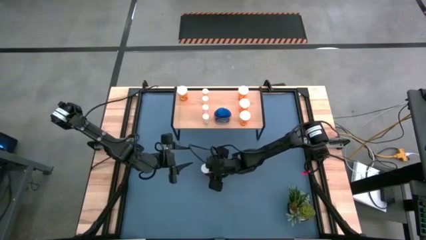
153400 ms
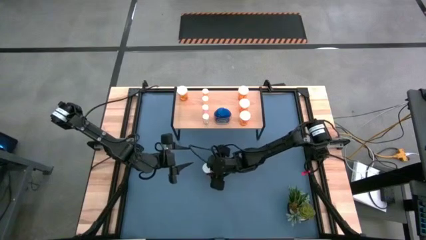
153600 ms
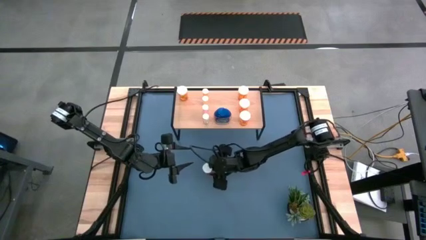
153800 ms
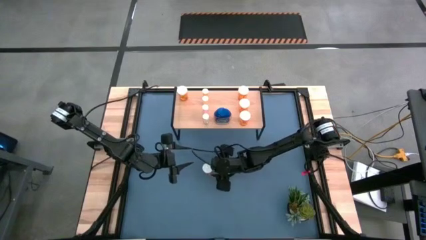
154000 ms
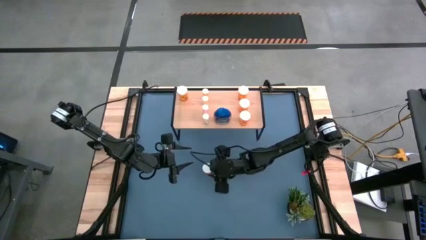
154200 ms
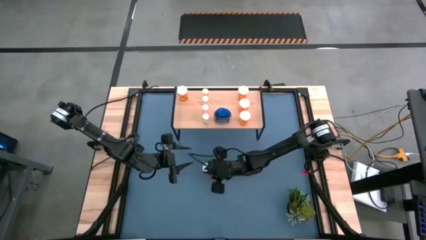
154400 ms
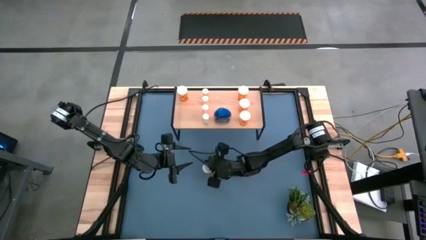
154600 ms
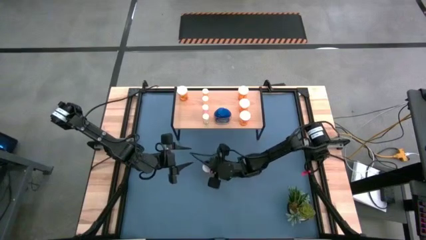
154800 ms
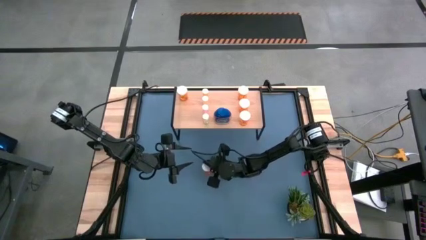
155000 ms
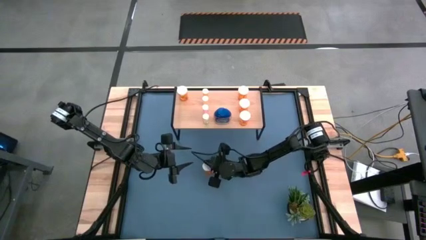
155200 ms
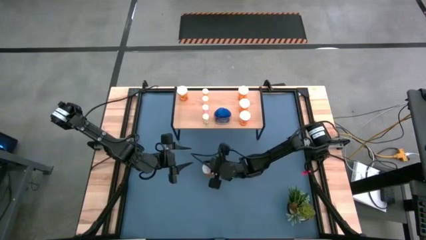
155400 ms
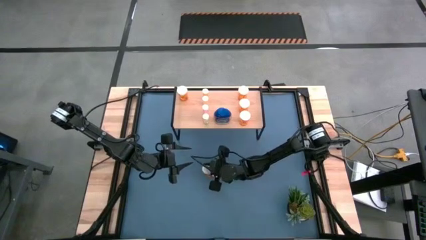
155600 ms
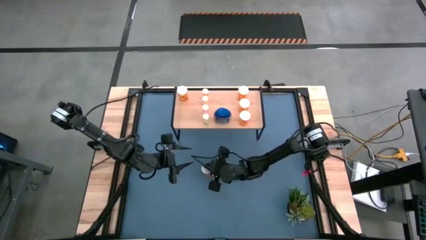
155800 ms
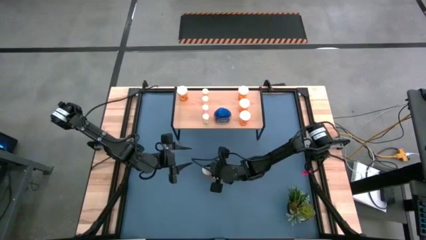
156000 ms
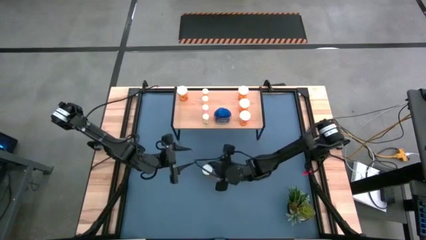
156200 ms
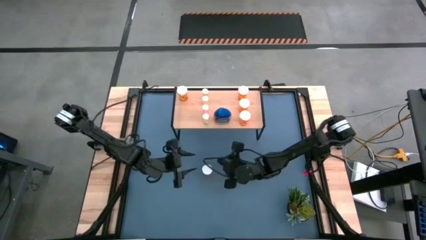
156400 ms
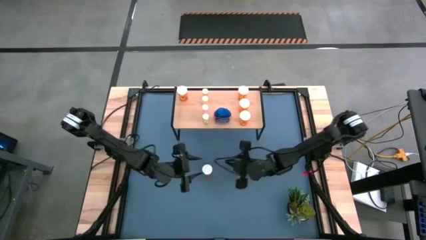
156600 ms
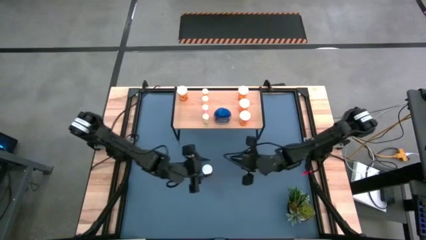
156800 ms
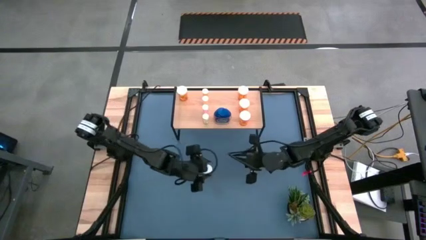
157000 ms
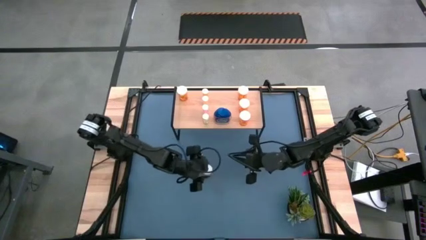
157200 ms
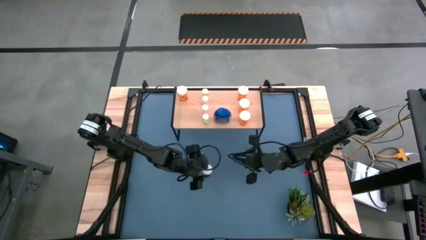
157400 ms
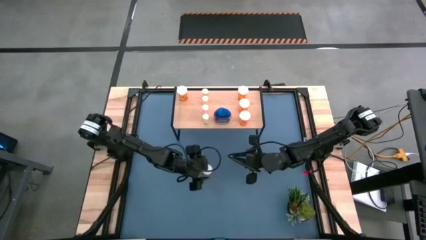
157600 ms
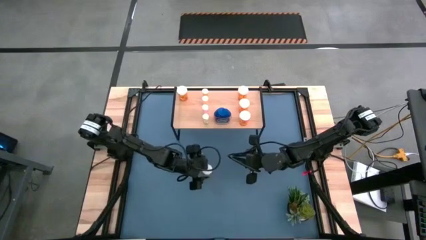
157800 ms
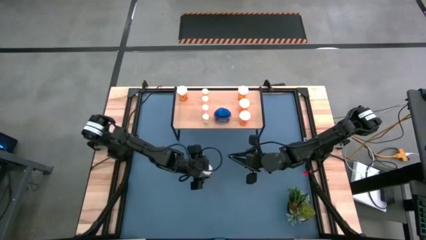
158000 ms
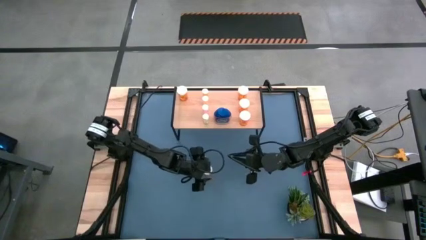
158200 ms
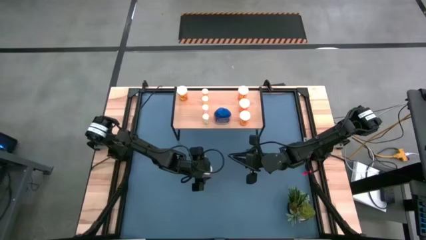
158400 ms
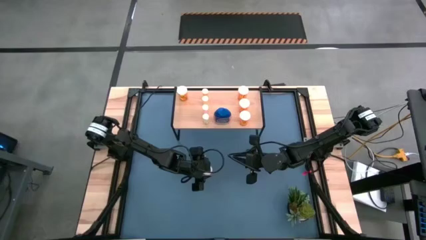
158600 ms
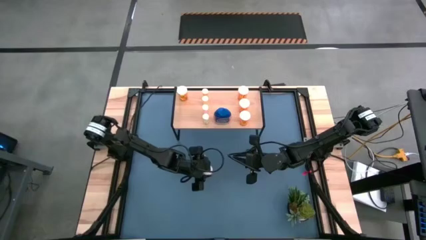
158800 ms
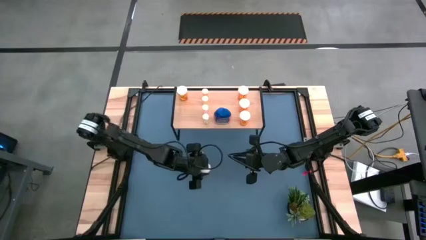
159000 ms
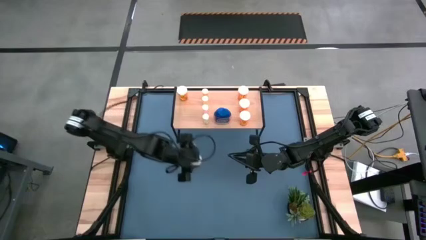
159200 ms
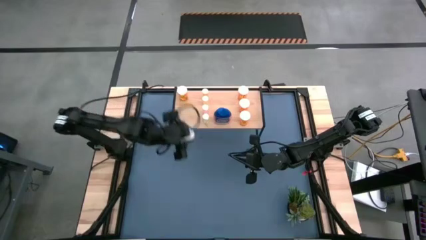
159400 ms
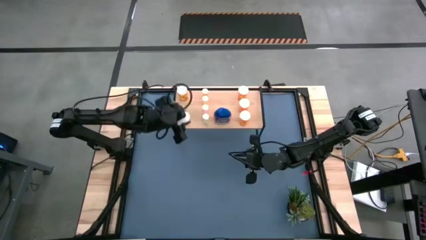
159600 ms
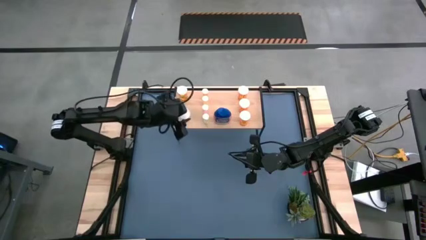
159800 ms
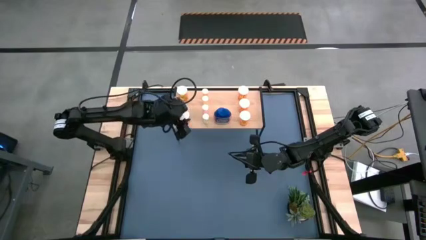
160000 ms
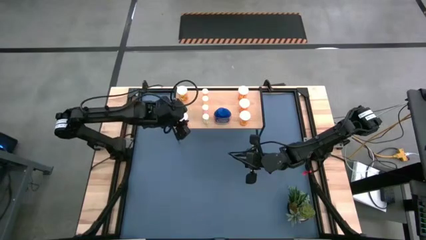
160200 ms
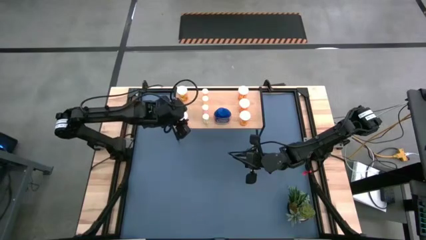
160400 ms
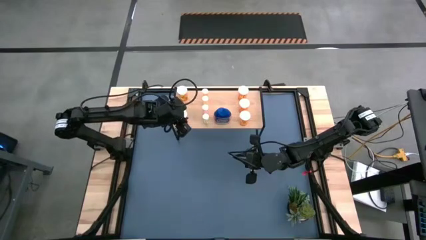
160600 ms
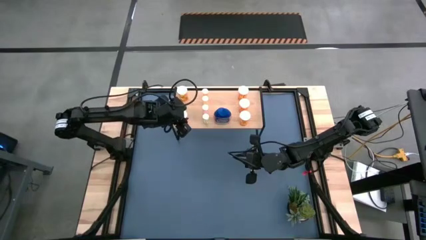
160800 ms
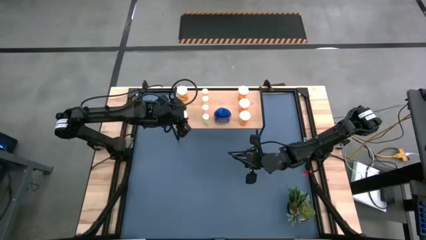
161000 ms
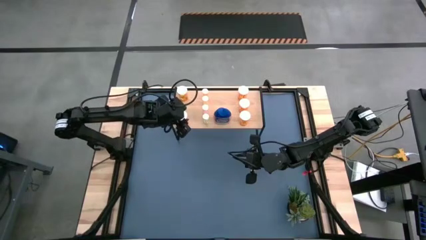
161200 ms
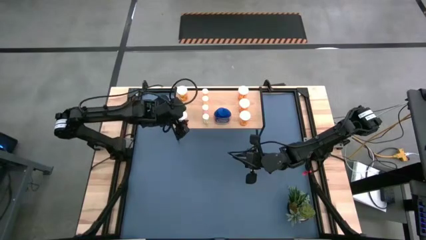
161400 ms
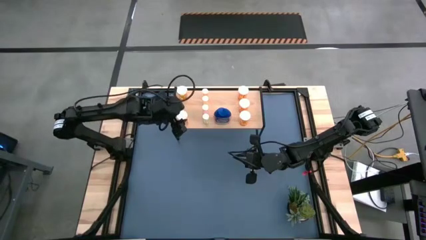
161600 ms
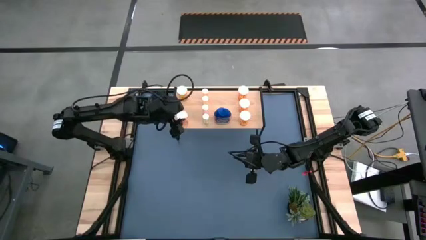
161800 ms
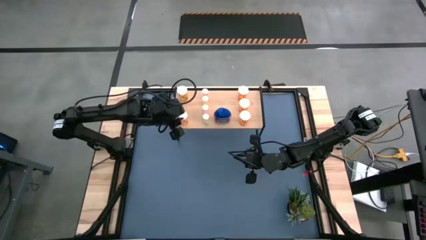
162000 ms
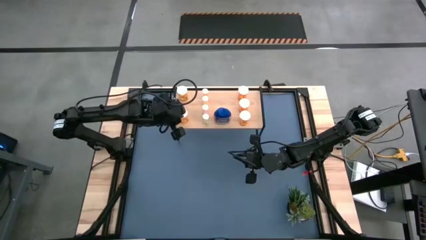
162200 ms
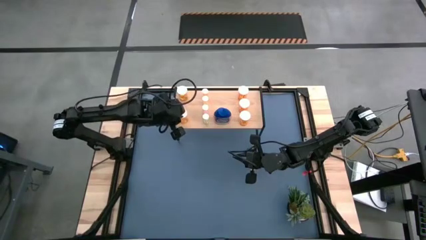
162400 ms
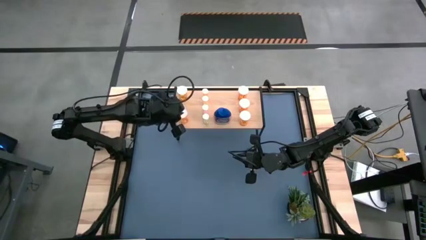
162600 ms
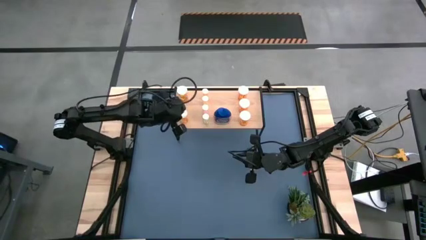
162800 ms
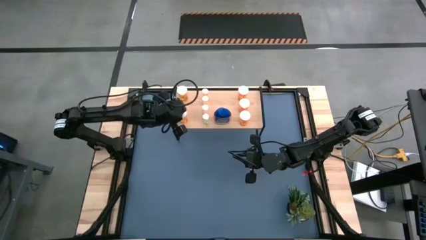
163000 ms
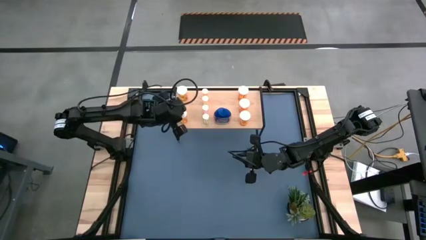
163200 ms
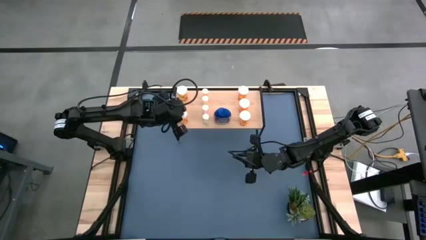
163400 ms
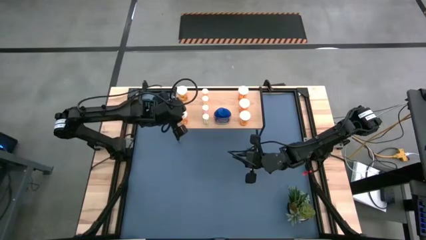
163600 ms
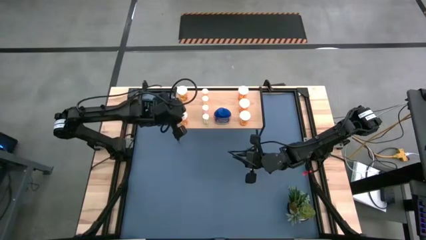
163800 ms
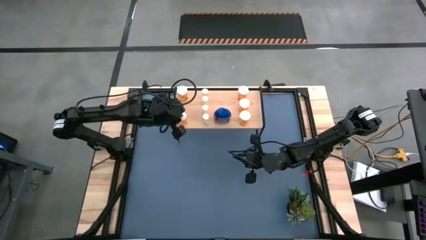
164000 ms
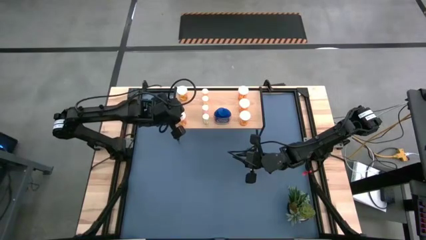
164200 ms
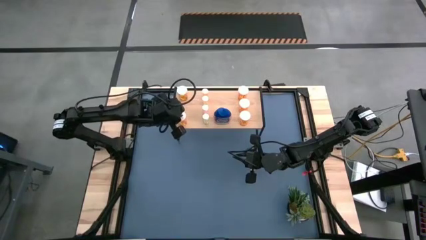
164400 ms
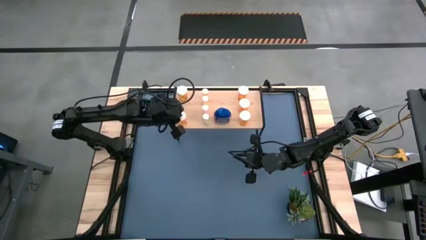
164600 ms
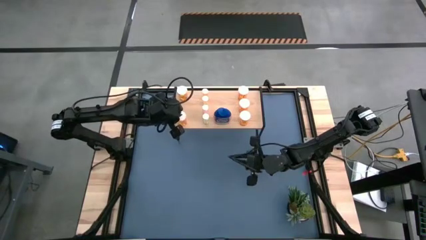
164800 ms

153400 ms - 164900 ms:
Task: Pick and place medicine bottles onto shelf by color
Align the large orange pill bottle with the other large orange pill bottle on the shelf

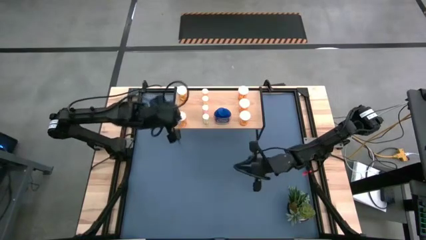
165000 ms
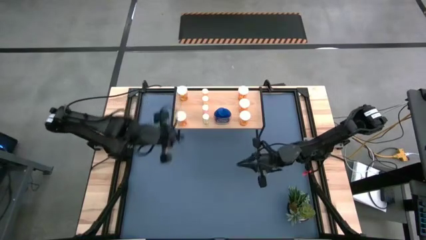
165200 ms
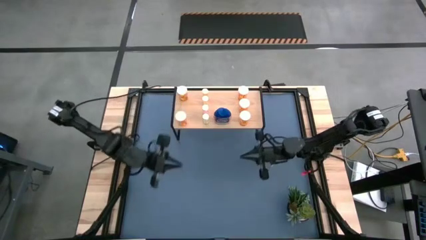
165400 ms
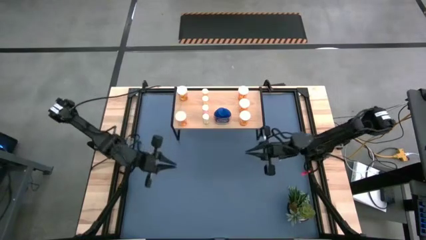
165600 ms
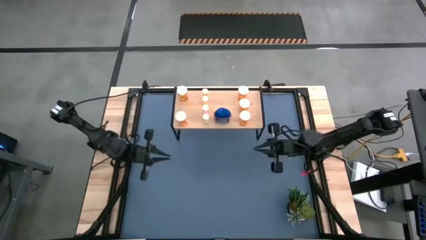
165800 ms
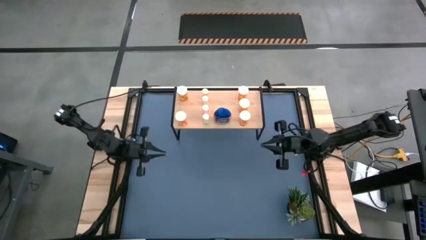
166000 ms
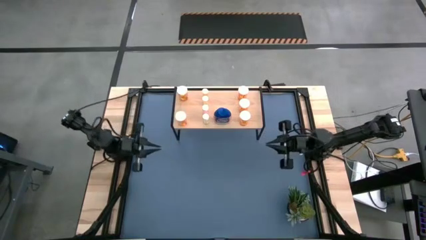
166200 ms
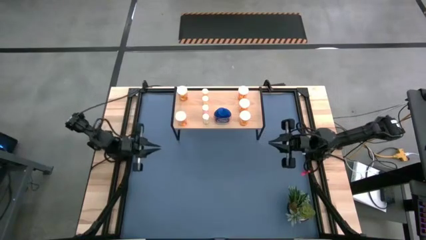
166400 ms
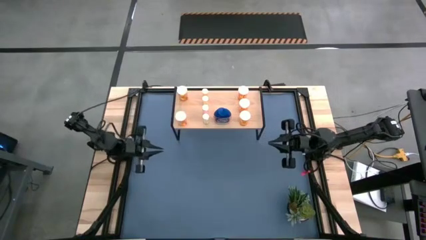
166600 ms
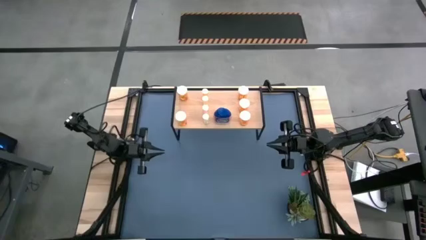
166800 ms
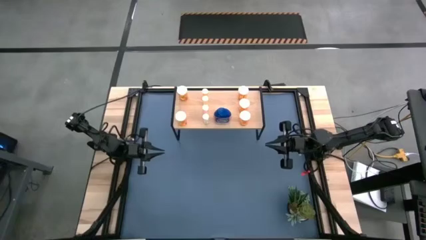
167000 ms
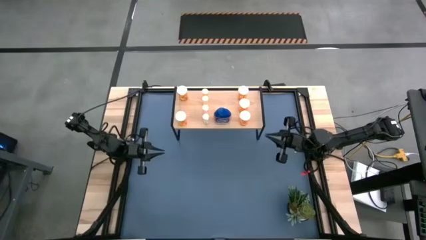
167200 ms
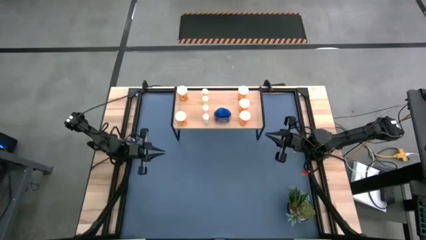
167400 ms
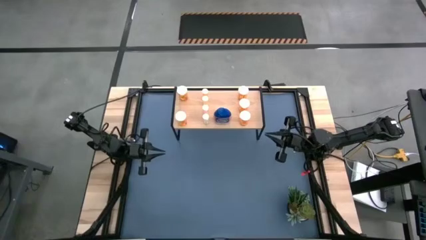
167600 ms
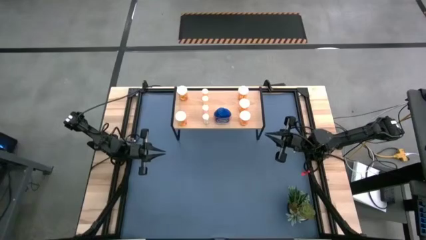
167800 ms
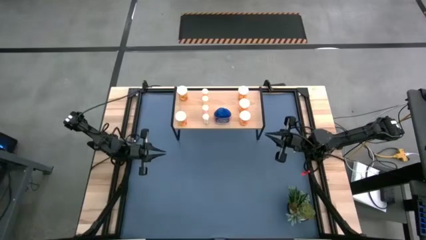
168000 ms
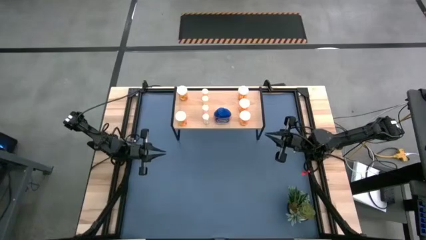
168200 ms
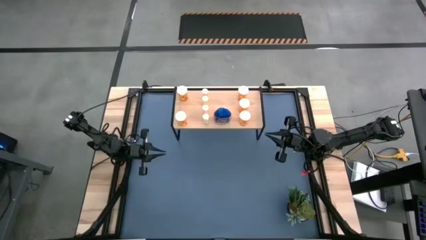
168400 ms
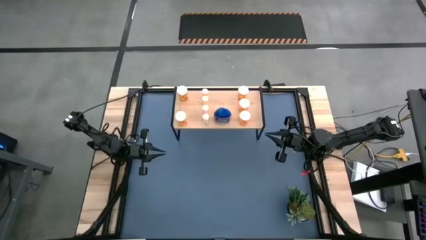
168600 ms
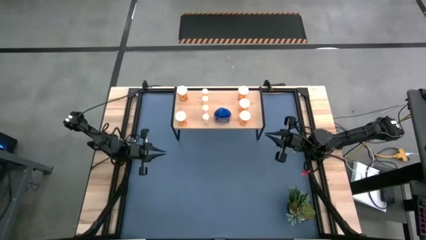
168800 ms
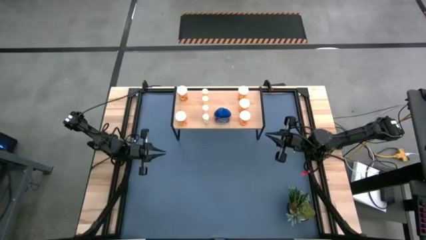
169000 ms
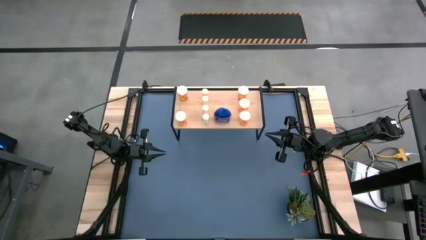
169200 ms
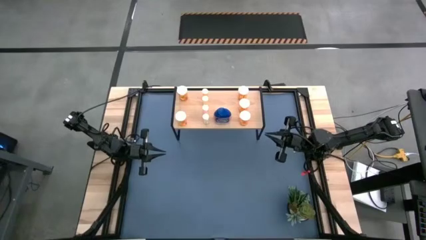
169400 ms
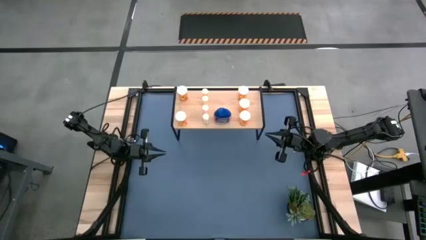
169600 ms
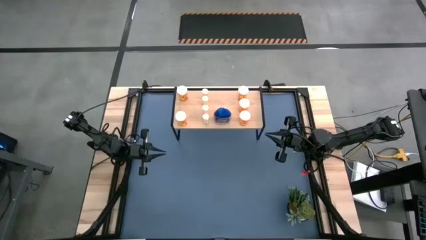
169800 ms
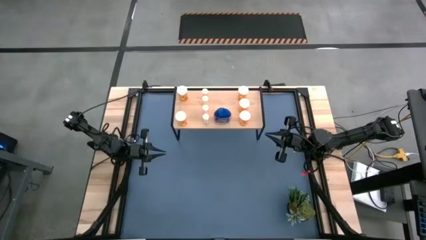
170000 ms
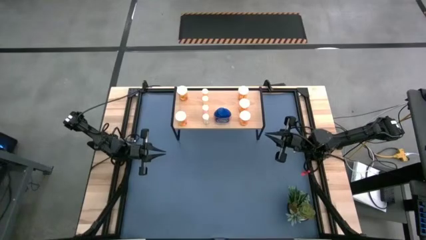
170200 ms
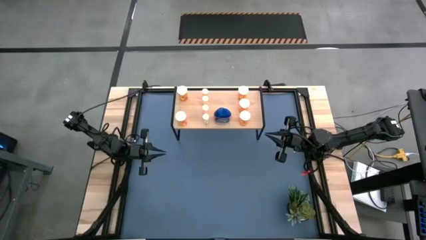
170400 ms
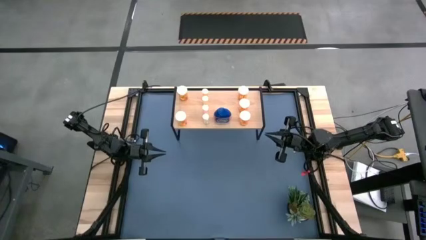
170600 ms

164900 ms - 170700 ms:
Return to Home Position
